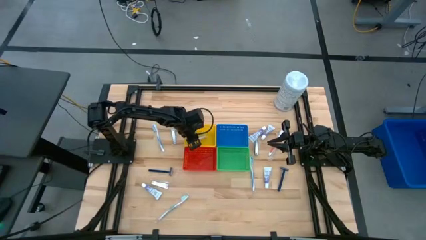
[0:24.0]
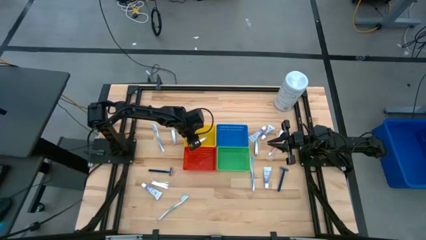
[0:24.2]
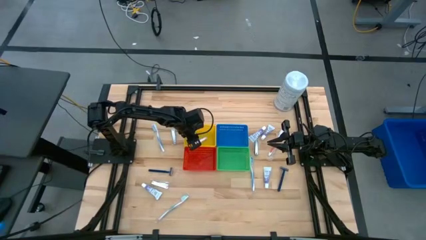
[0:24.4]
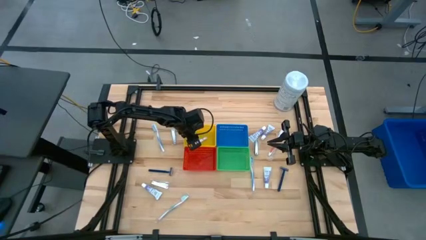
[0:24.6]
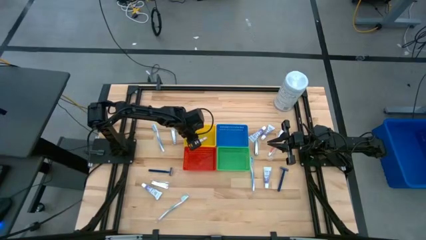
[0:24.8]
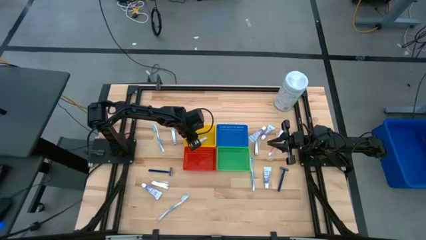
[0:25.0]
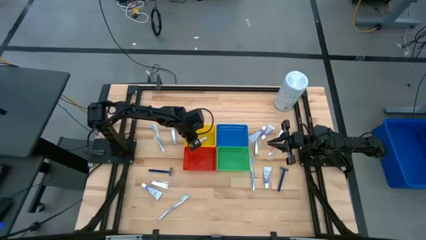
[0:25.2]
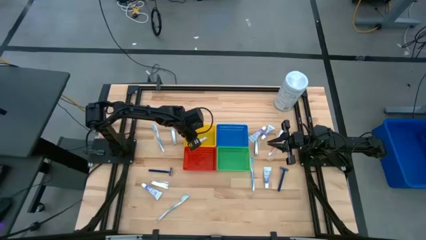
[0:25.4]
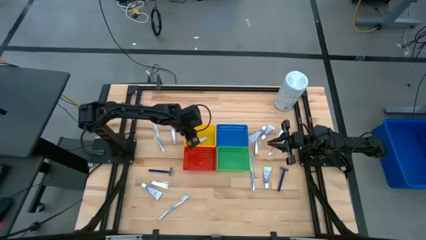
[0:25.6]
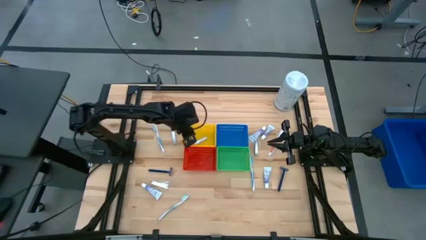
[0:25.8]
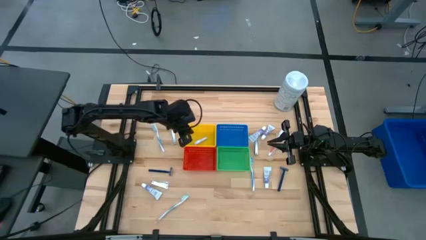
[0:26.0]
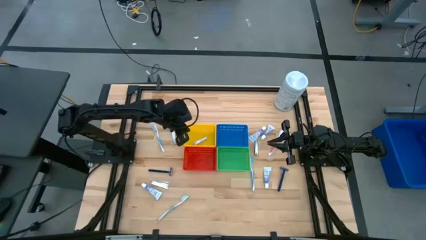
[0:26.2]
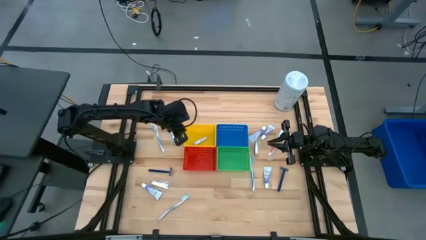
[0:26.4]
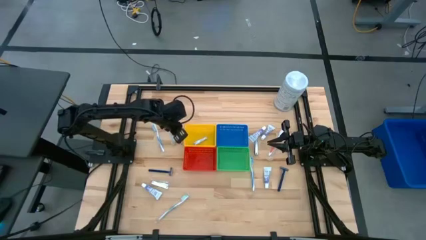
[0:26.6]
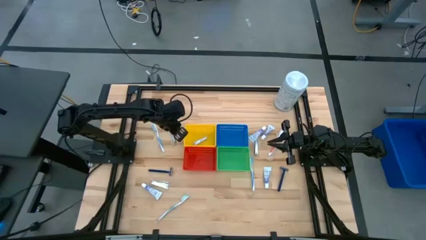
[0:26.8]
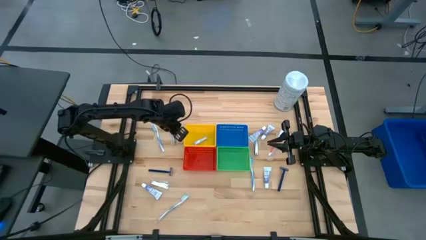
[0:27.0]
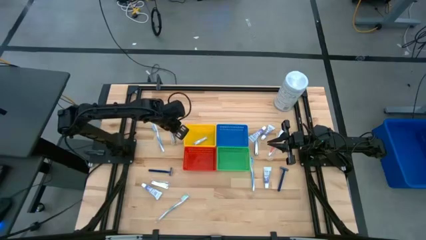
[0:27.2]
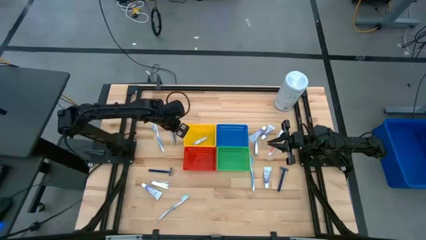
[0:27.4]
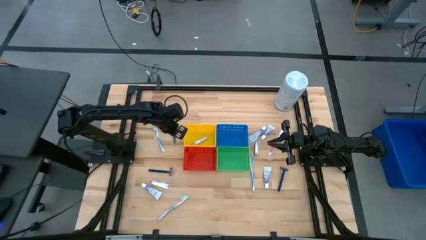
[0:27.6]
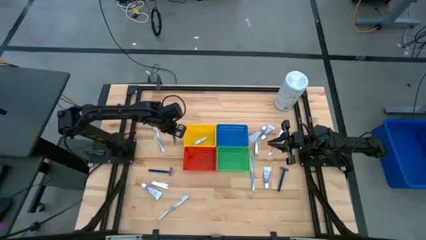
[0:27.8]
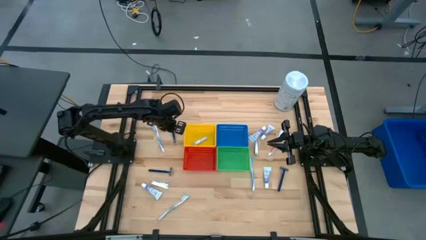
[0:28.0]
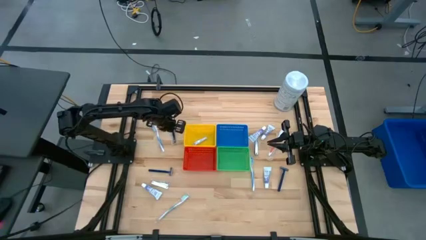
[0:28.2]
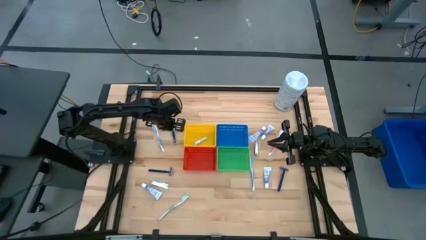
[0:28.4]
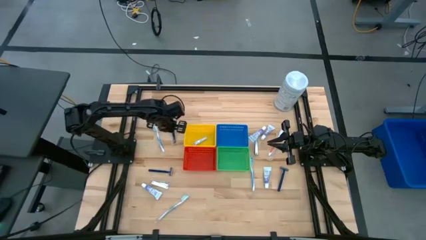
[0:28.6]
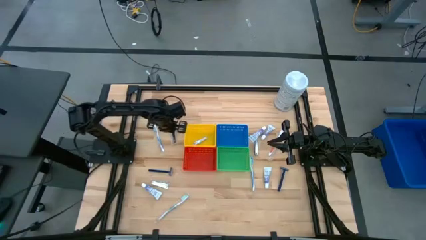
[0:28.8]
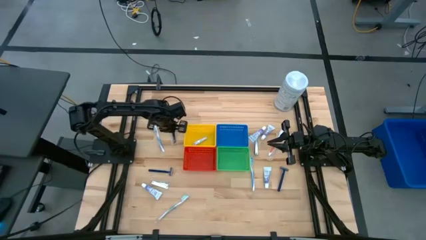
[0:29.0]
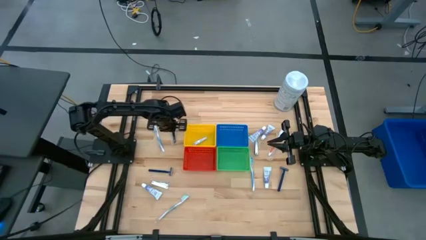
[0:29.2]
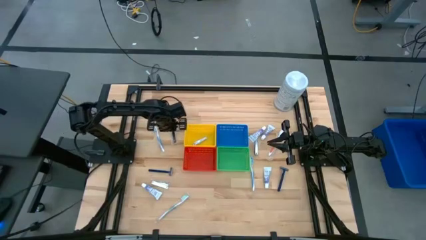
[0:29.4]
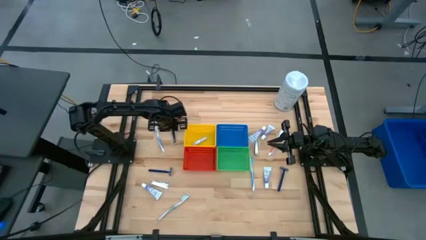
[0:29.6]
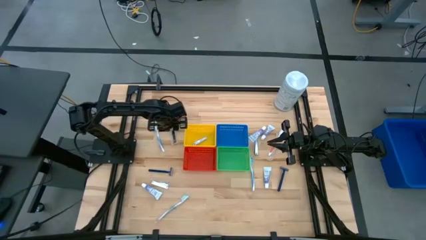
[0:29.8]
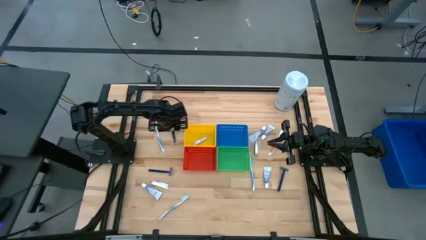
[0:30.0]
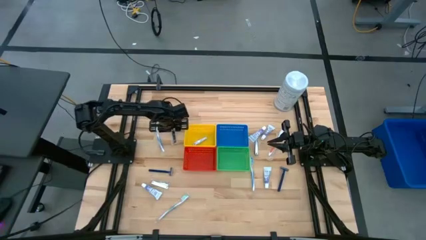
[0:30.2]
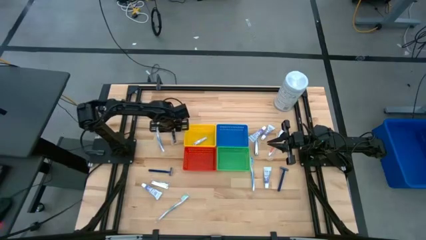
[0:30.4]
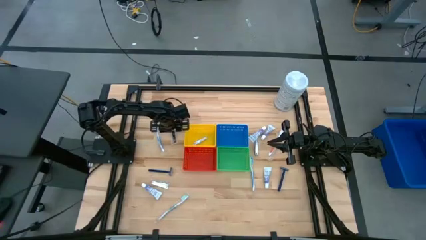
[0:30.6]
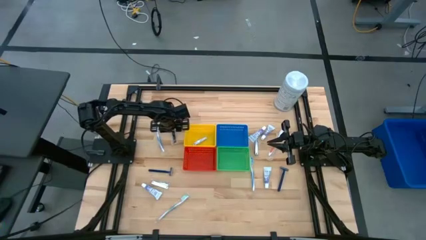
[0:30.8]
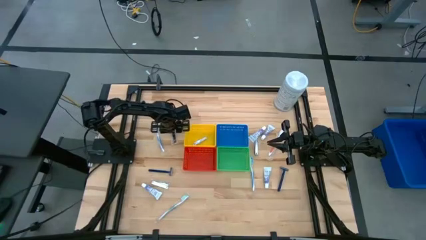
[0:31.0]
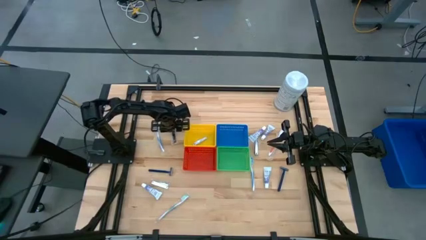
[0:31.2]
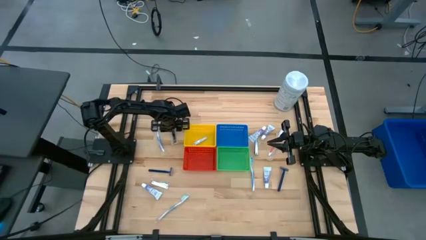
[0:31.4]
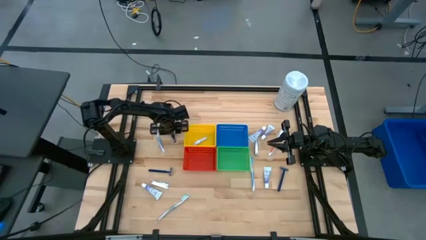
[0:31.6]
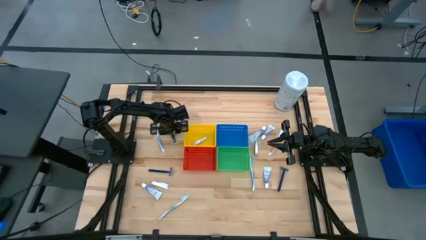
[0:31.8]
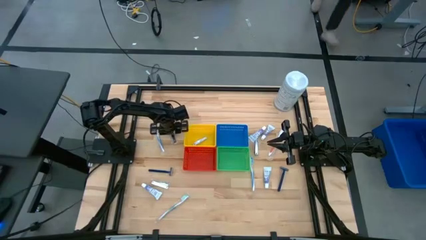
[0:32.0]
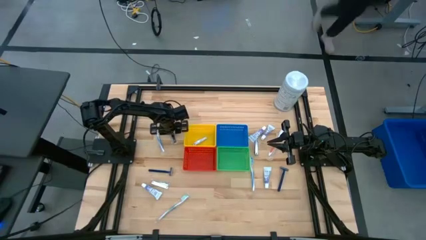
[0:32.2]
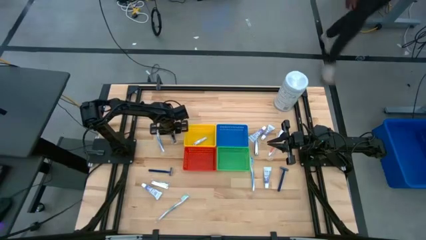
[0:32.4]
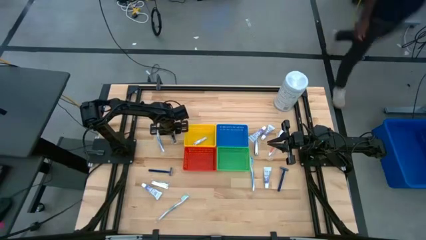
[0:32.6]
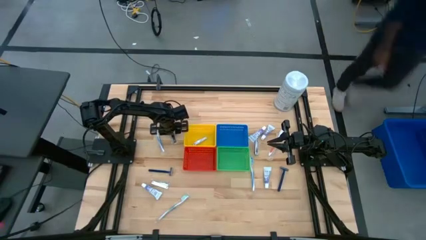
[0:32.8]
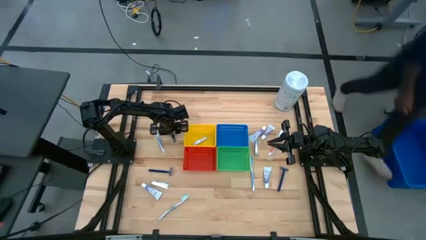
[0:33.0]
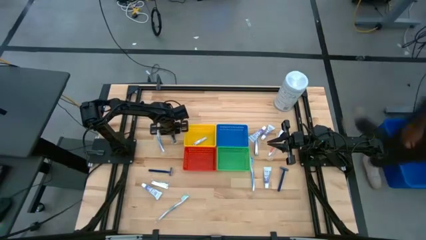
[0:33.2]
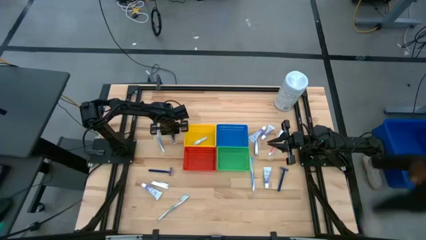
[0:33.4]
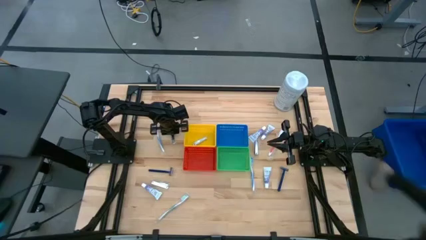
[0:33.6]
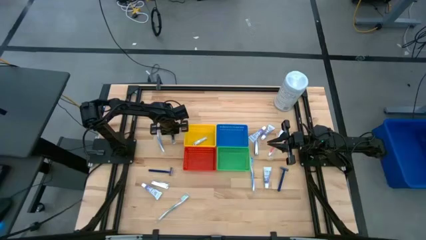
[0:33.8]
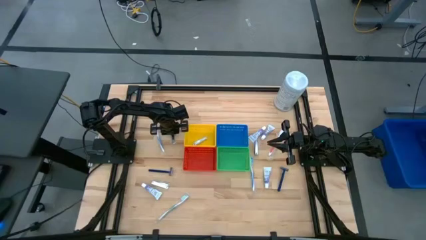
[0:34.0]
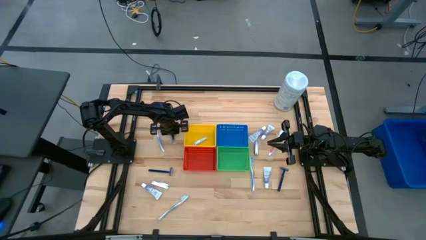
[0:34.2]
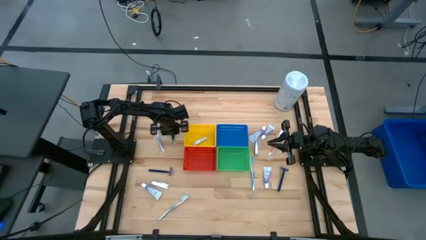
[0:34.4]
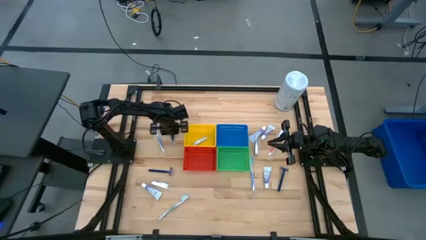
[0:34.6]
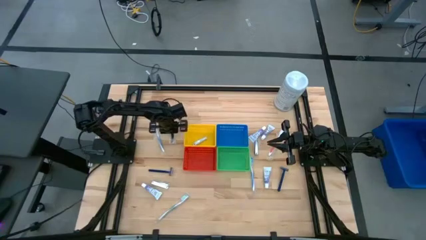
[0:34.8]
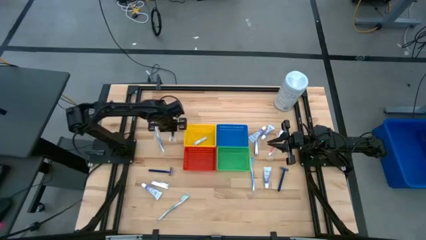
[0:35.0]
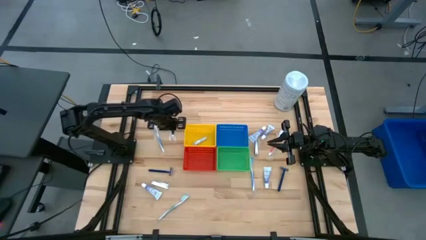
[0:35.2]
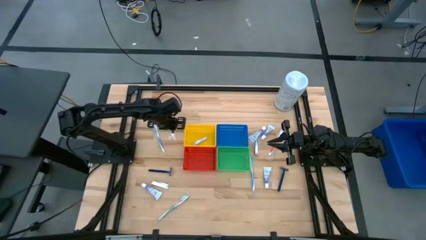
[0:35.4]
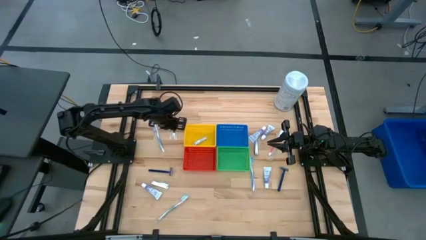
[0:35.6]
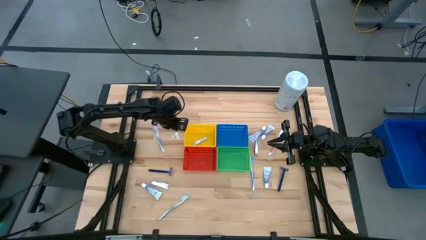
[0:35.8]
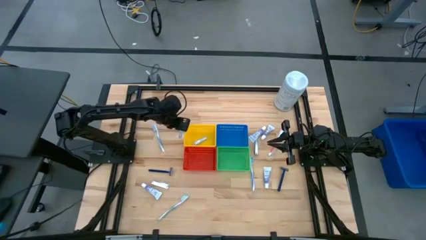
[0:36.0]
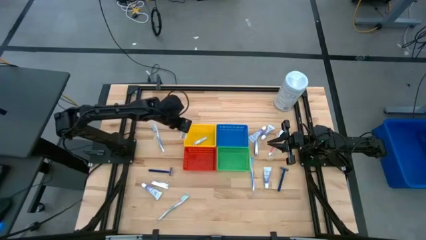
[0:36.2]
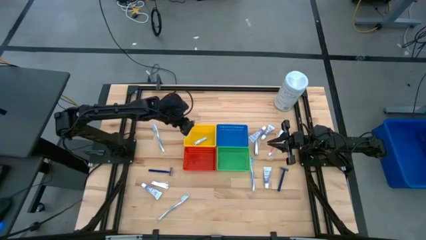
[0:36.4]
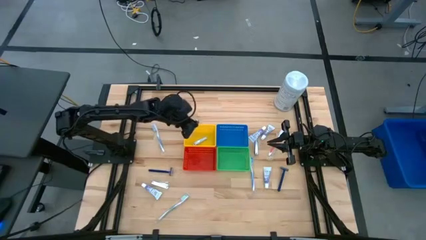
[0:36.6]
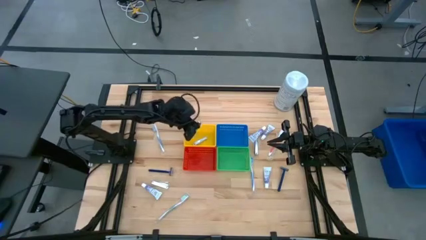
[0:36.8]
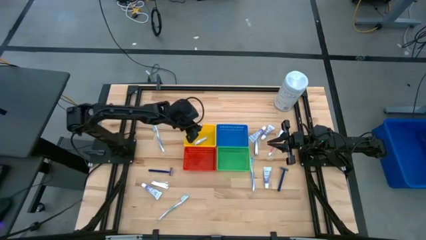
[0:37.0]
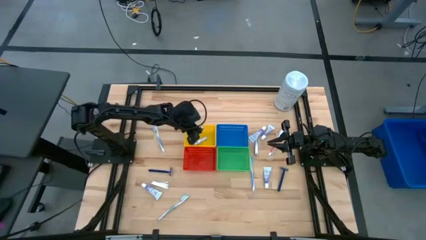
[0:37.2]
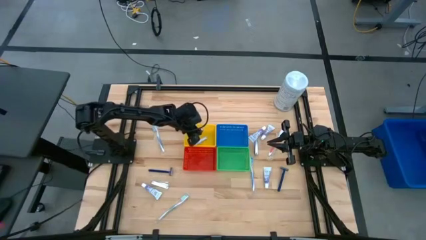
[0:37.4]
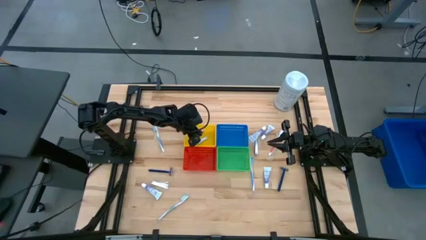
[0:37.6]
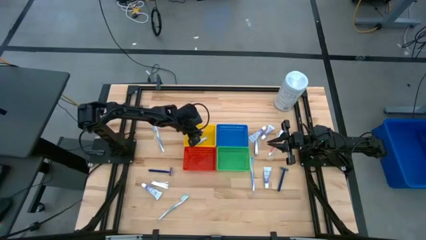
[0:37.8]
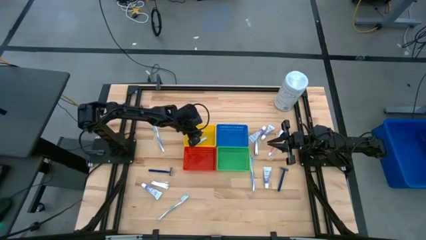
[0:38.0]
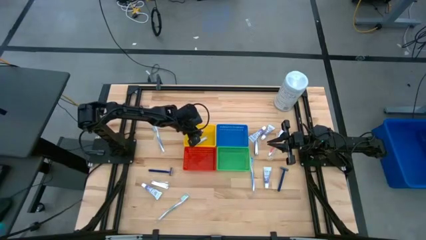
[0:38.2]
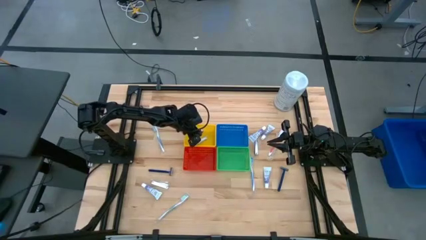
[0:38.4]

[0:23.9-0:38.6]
Task: Pick & Place Travel size toiletries
Put the middle left nail cutter into the yellow bin

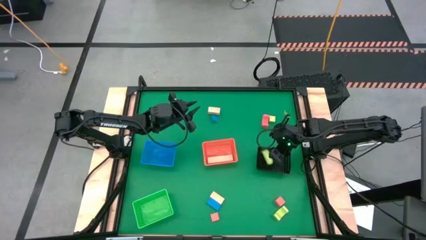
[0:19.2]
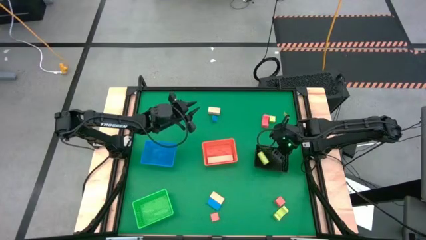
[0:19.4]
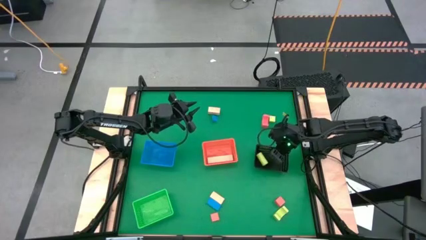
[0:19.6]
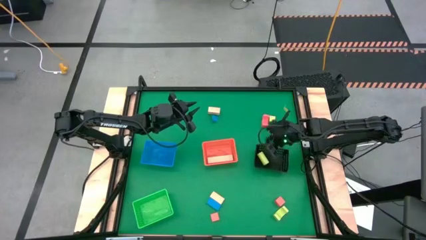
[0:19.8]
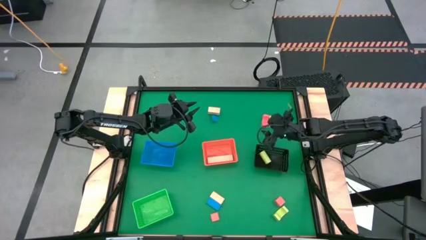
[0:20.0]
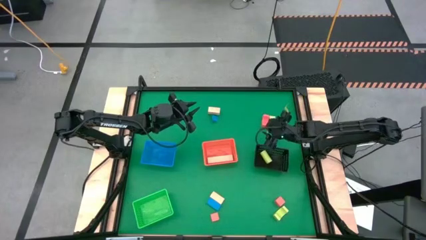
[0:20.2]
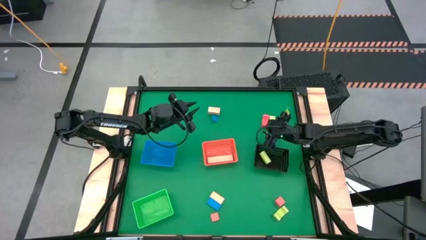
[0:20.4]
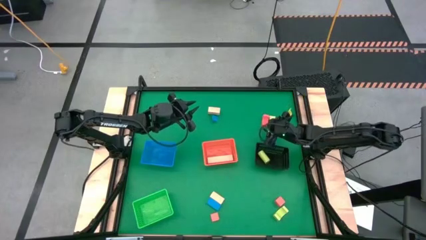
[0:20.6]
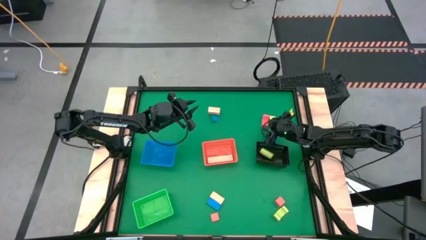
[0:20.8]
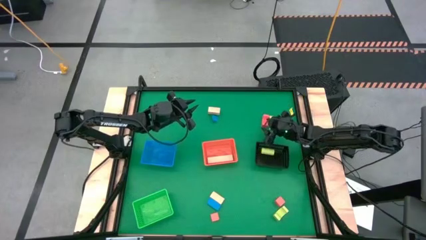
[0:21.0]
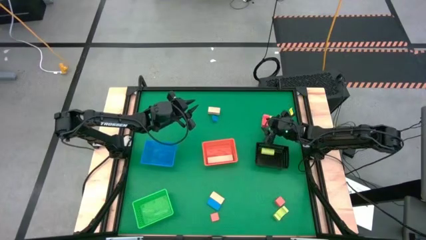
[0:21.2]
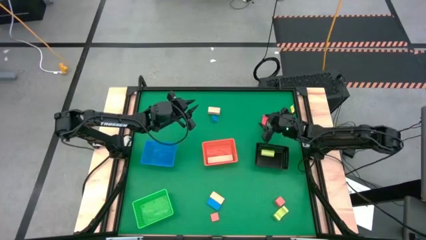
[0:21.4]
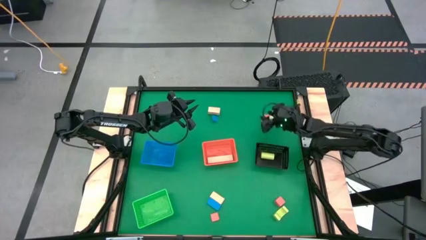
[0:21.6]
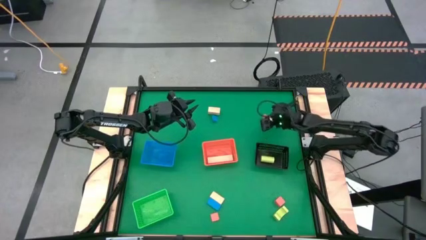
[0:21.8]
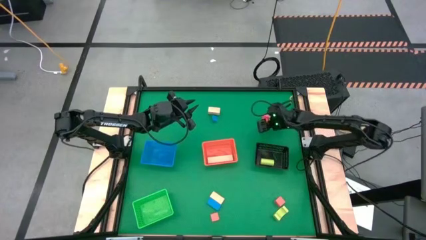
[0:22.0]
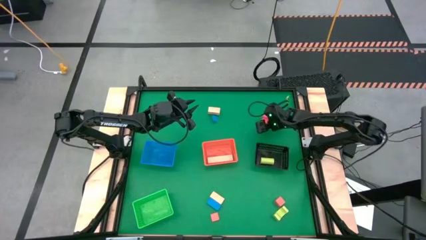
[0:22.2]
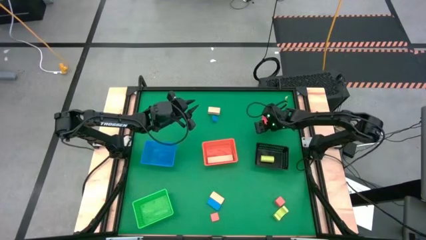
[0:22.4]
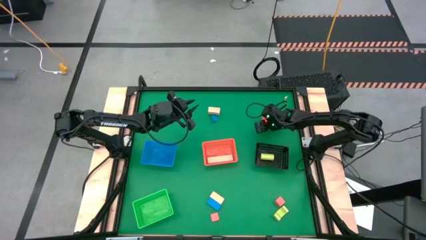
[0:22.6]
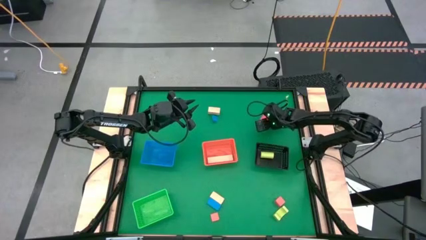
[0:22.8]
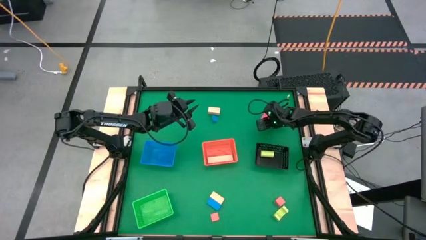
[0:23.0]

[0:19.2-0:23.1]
Task: Sort & place blocks by color
Put the top orange block into the green bin
